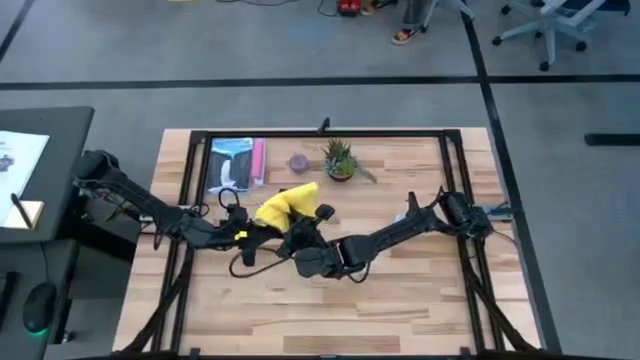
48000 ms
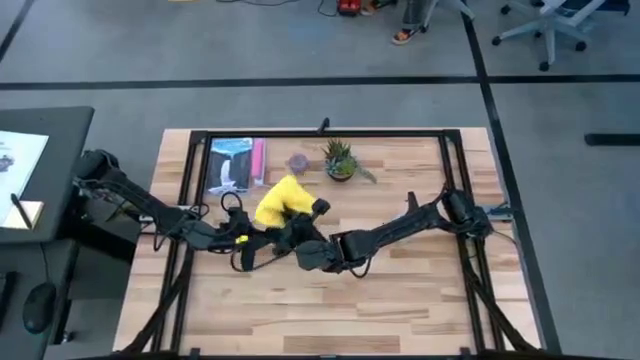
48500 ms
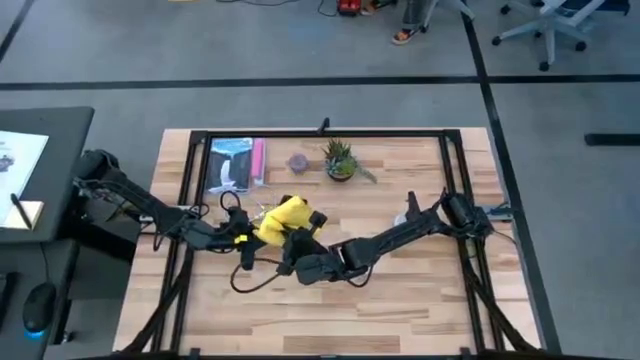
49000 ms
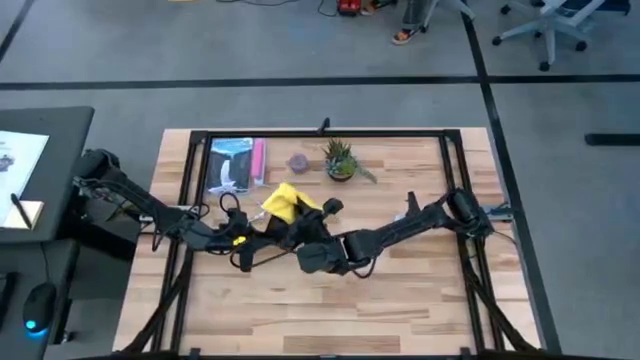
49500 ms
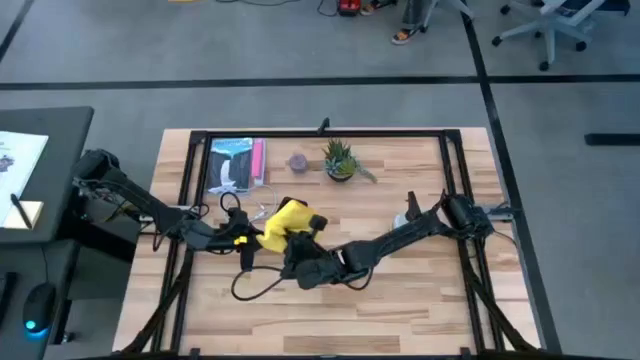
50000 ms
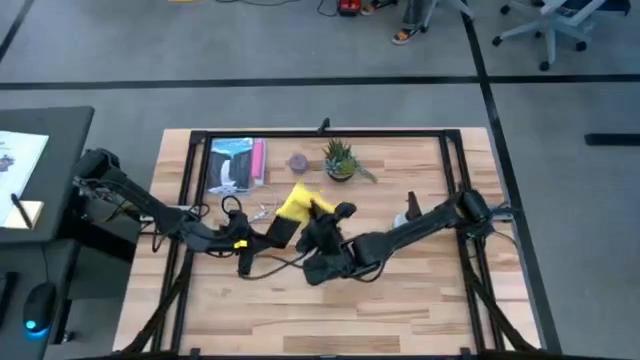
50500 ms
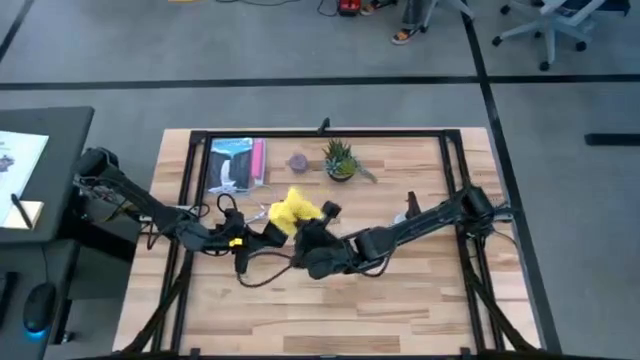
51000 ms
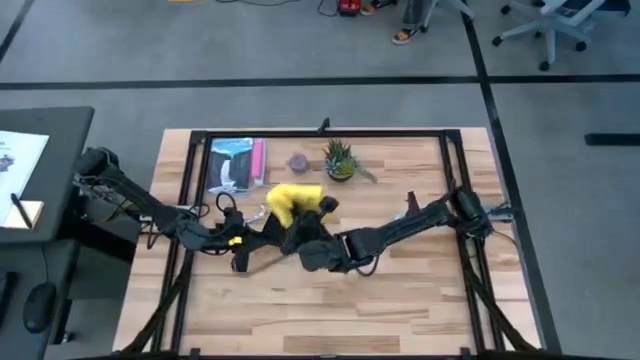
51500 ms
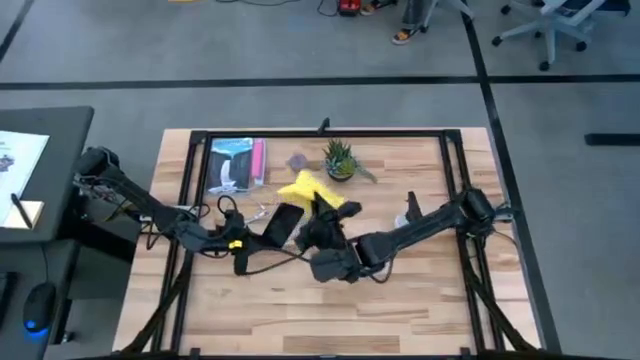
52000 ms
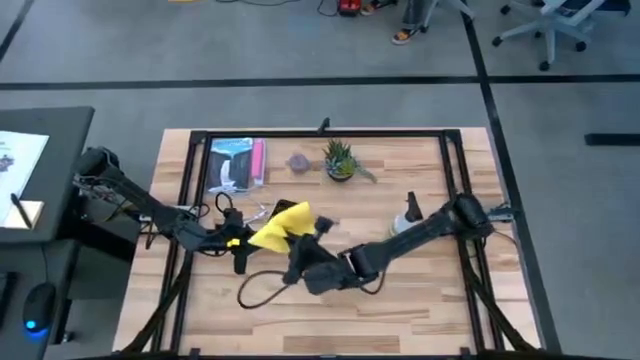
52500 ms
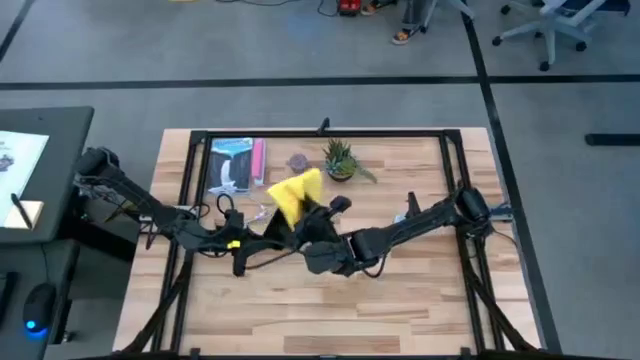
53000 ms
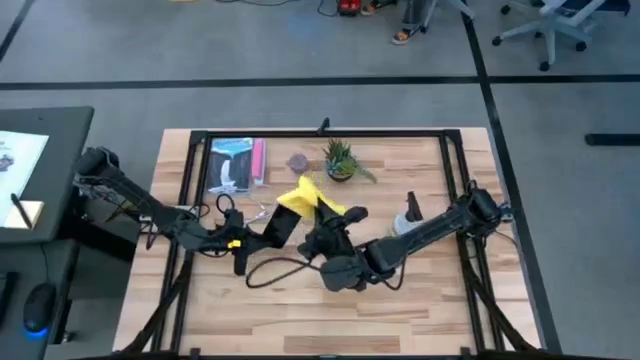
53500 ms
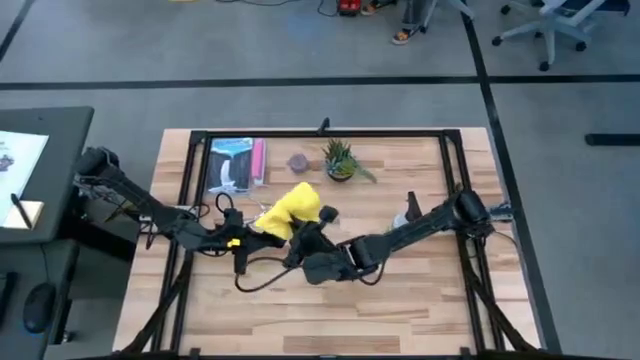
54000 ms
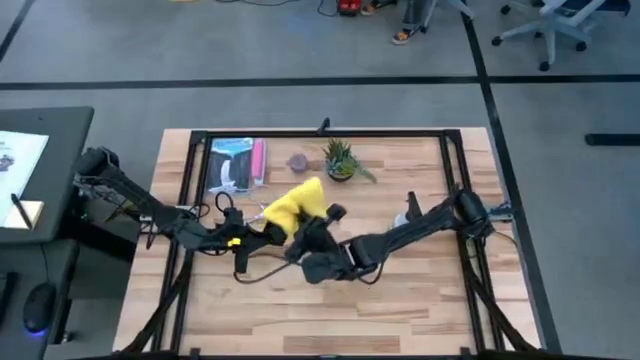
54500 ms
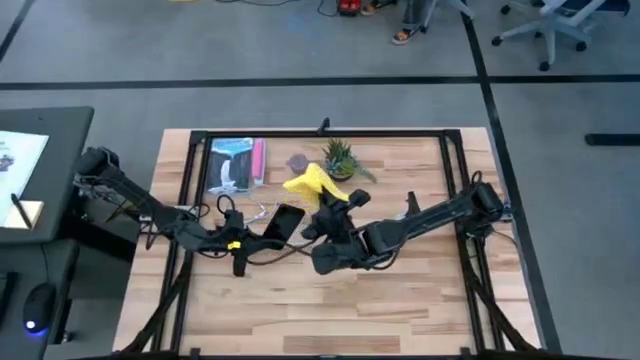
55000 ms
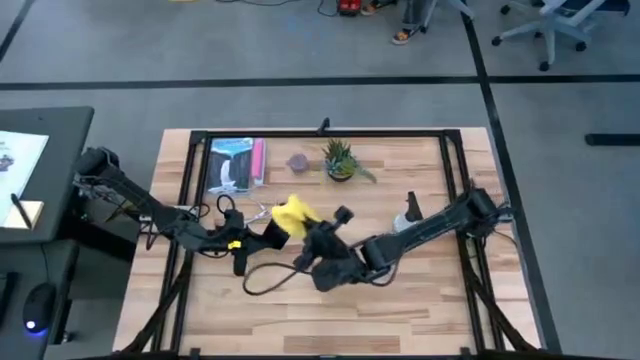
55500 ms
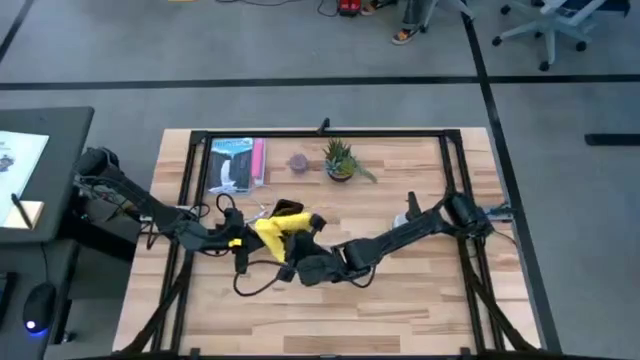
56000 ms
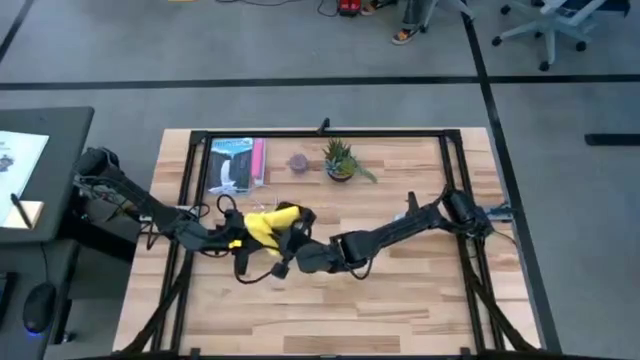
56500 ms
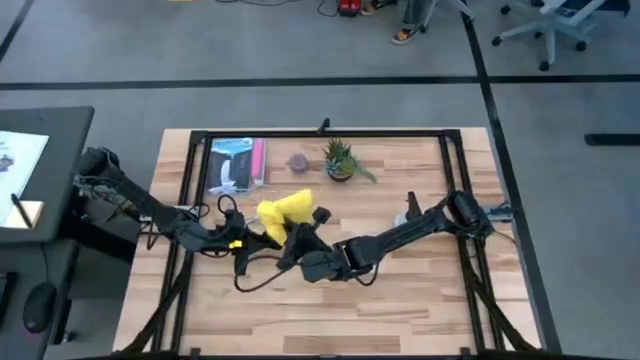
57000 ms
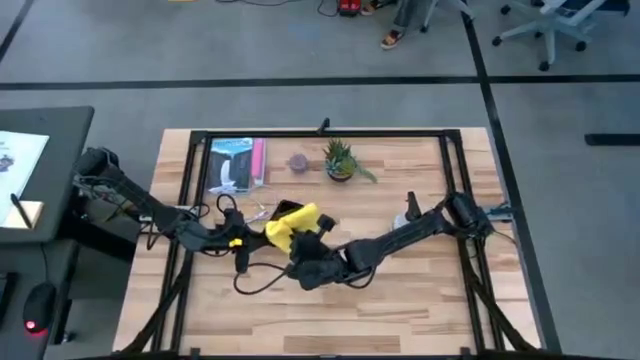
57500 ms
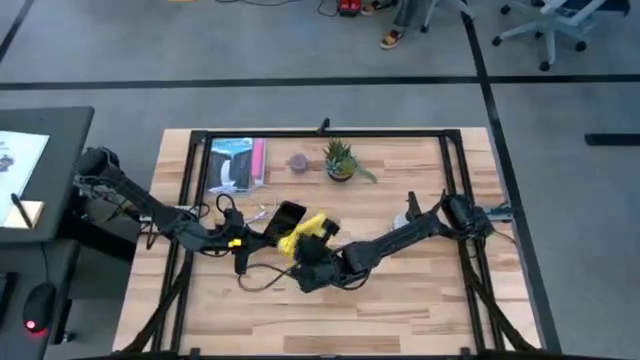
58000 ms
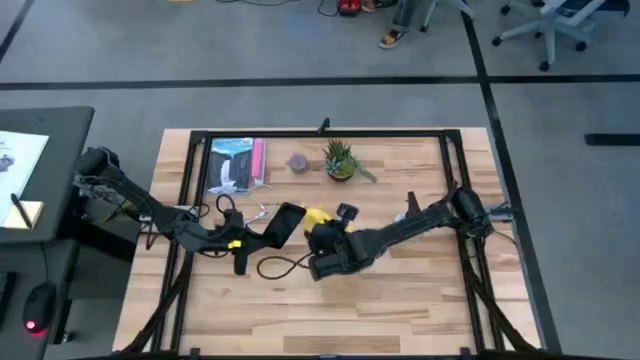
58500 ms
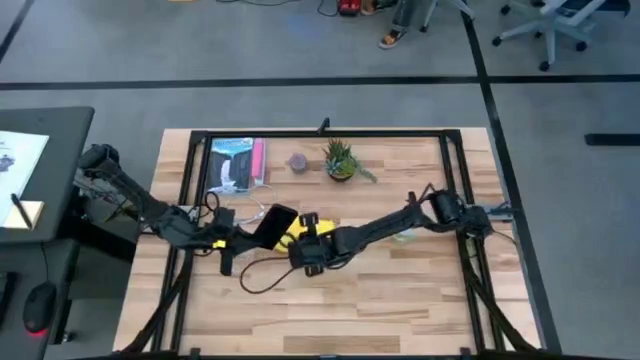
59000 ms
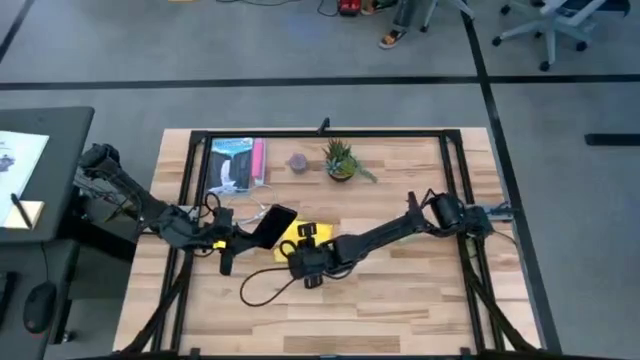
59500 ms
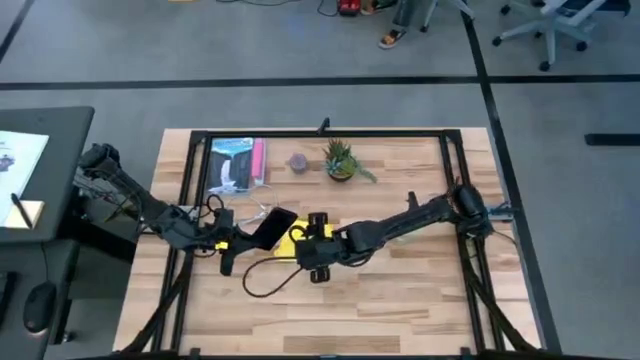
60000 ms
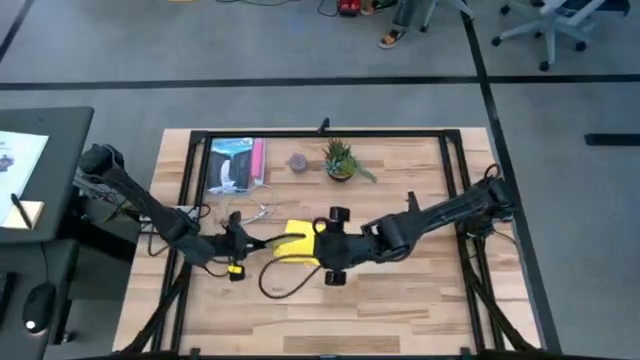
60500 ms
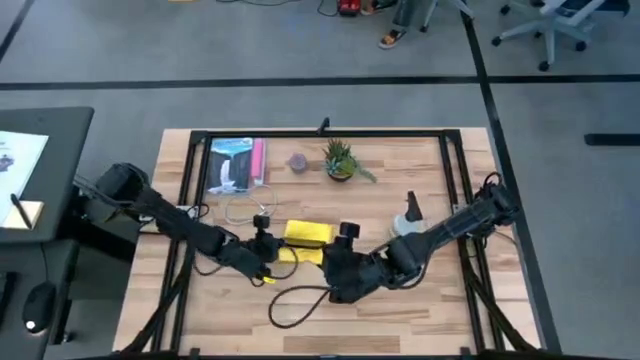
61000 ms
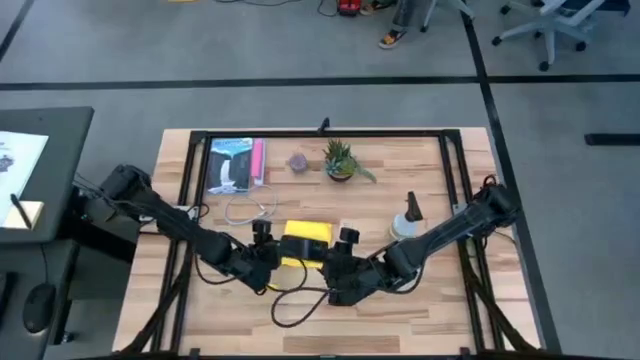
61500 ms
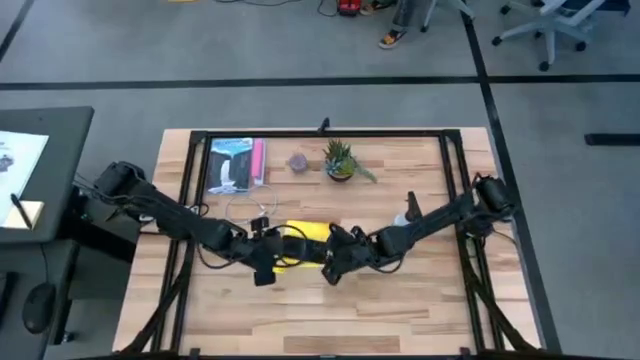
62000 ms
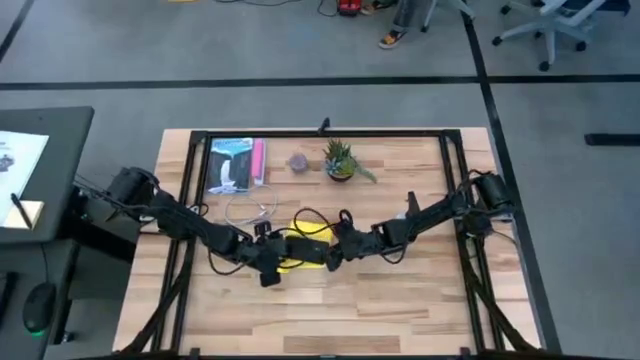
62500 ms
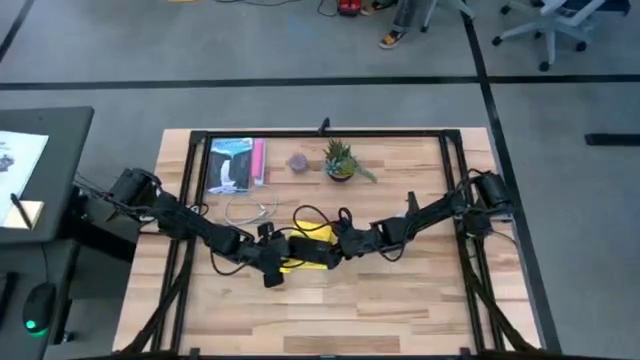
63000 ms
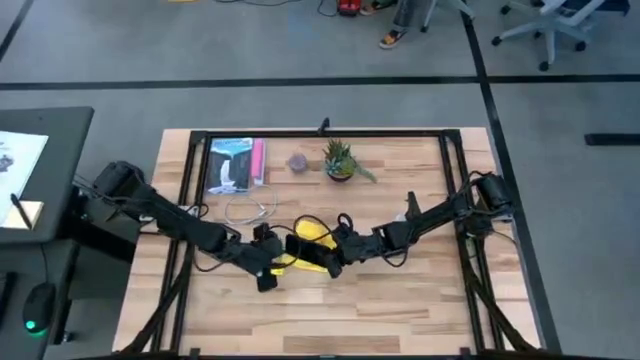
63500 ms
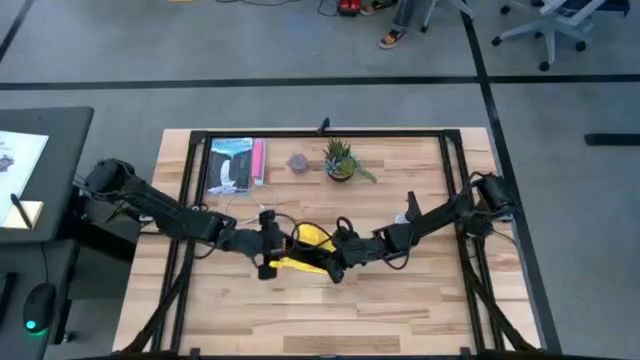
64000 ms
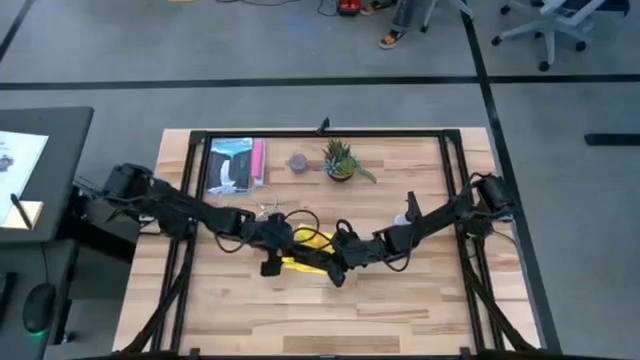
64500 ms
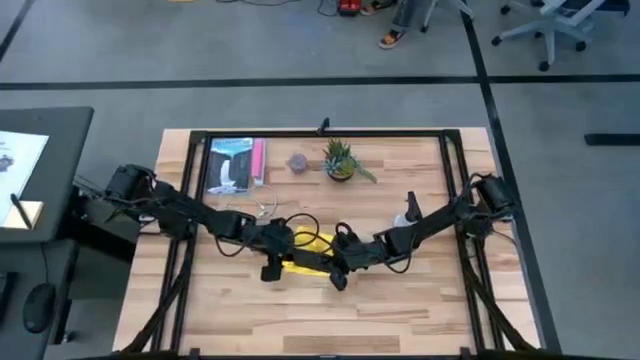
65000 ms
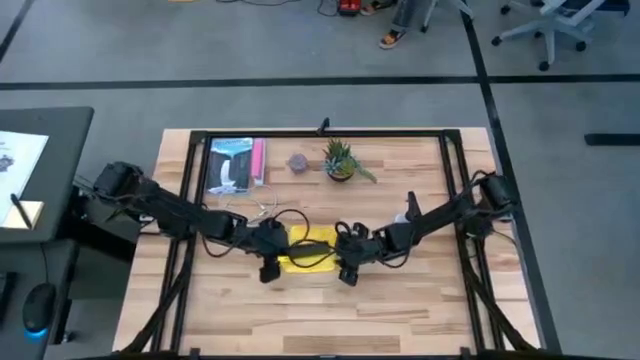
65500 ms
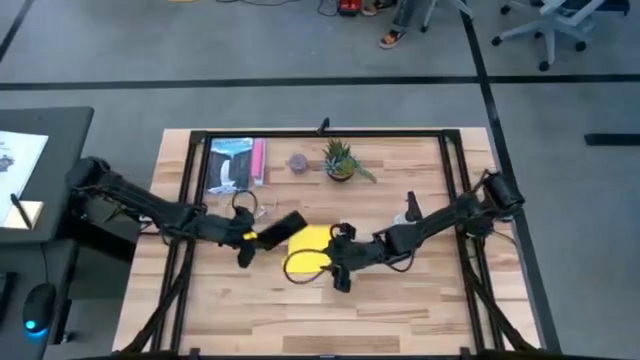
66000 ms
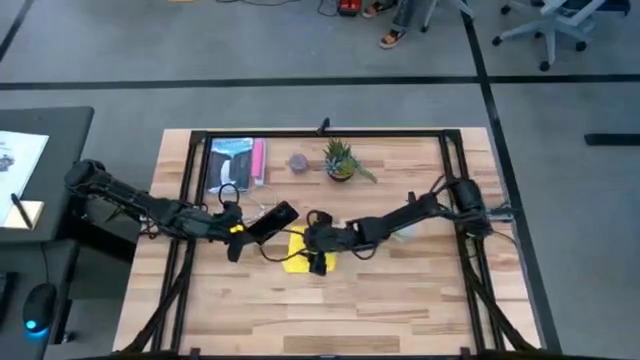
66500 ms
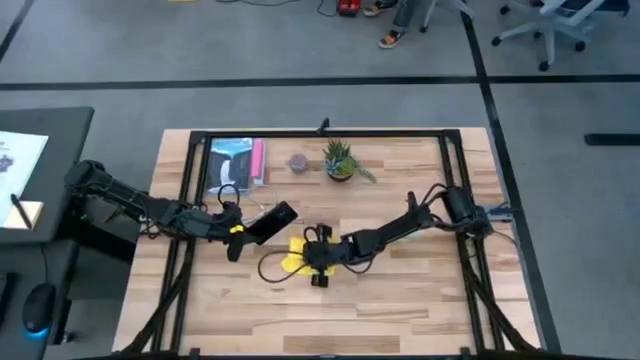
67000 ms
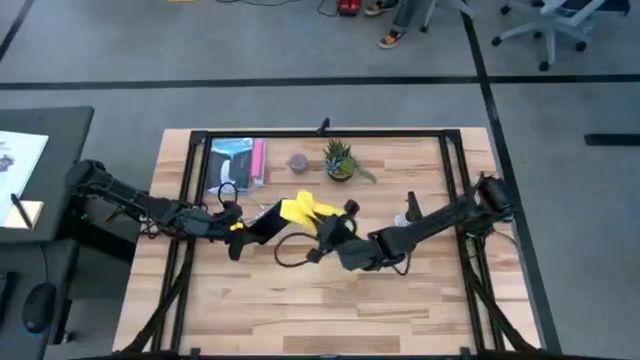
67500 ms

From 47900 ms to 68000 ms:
Task: Apply microfiber cloth
Wipe the front and back of the cellphone with the microfiber cloth
